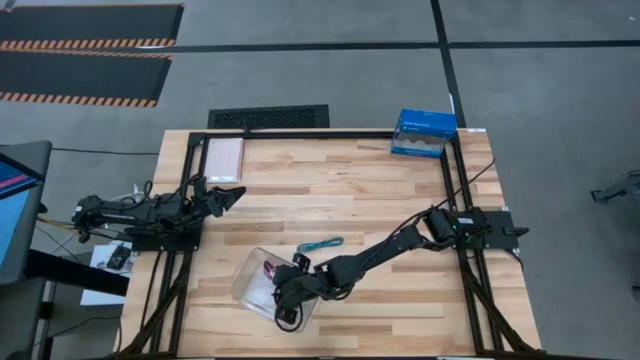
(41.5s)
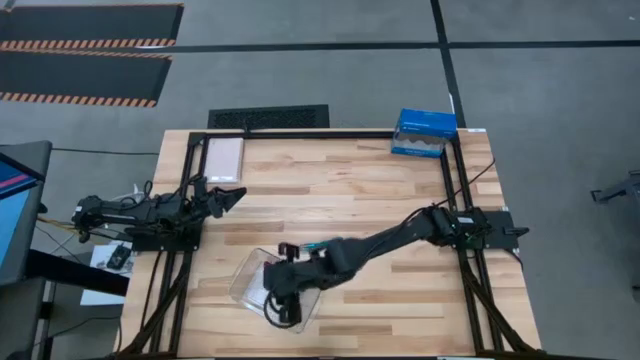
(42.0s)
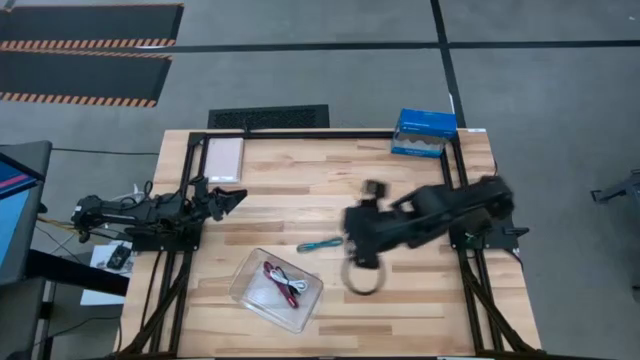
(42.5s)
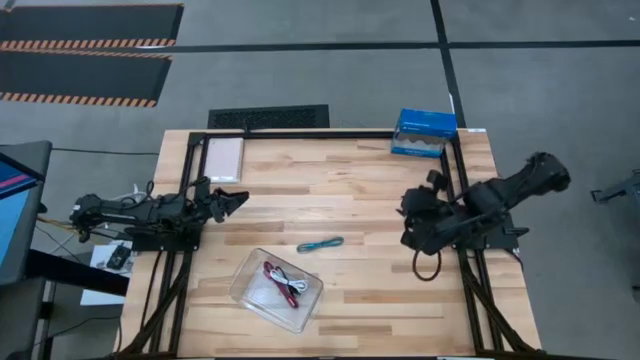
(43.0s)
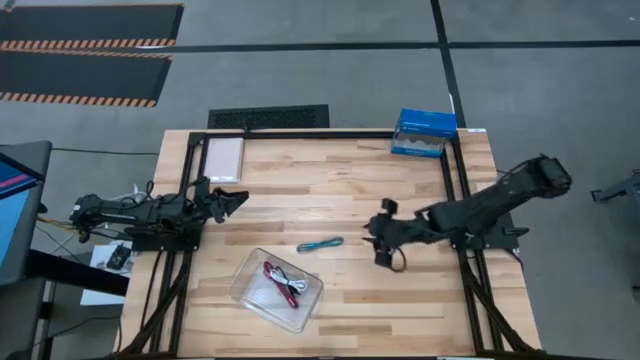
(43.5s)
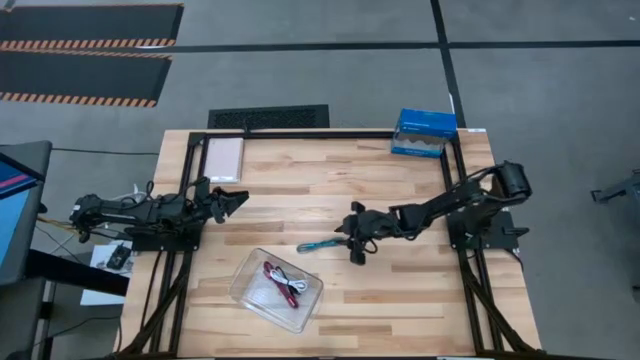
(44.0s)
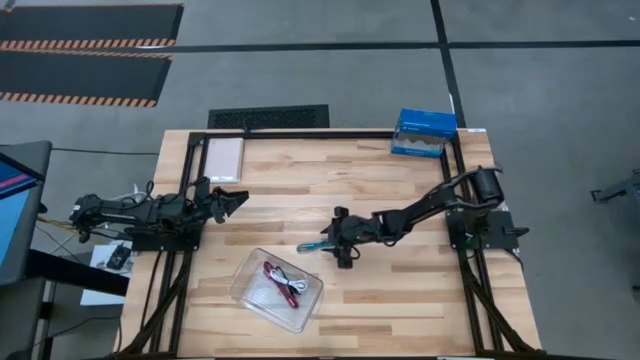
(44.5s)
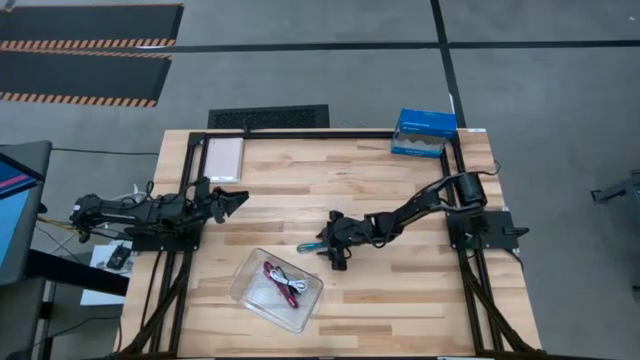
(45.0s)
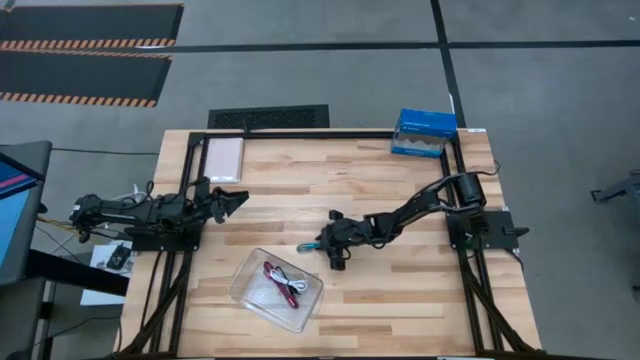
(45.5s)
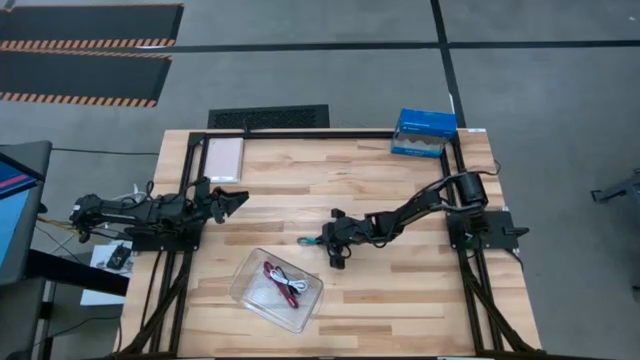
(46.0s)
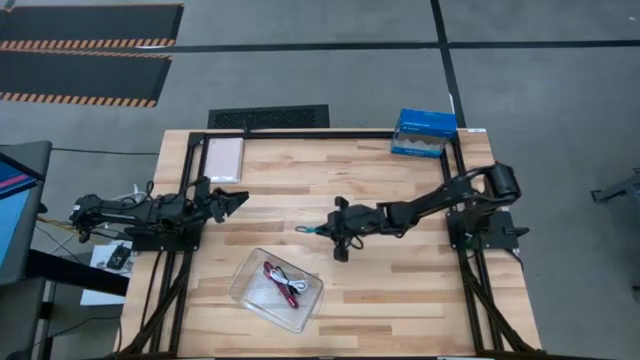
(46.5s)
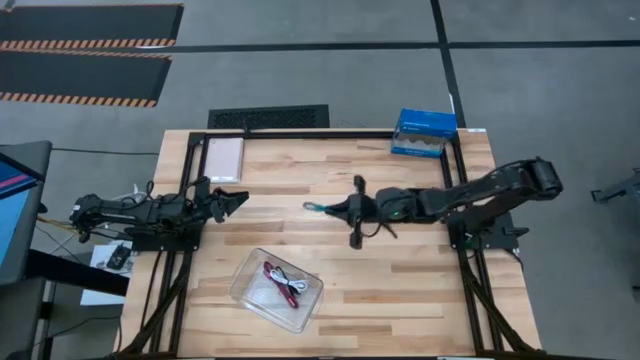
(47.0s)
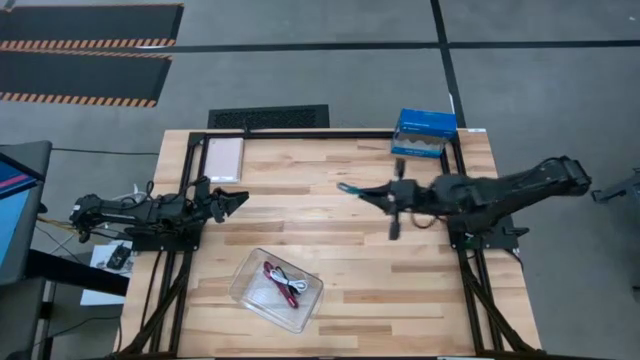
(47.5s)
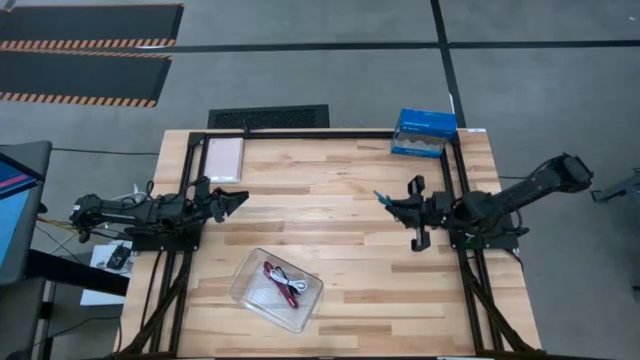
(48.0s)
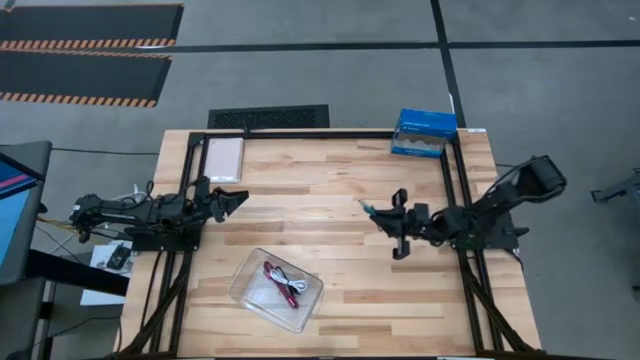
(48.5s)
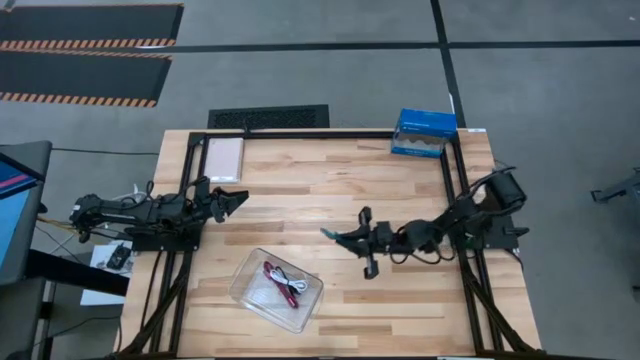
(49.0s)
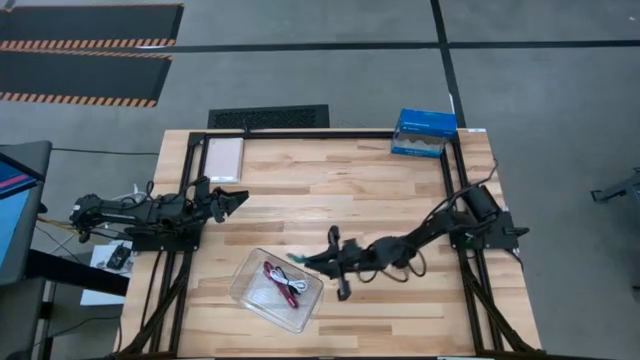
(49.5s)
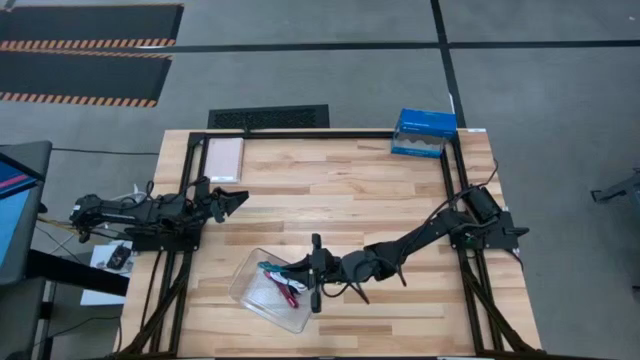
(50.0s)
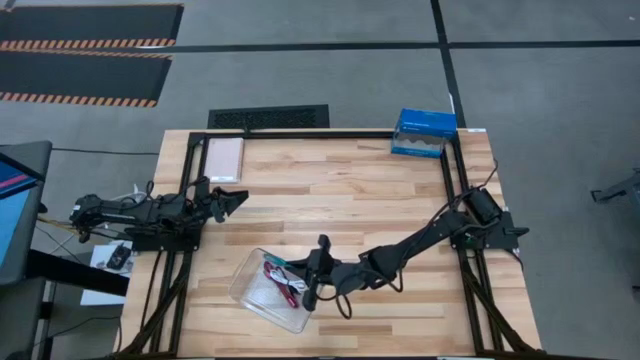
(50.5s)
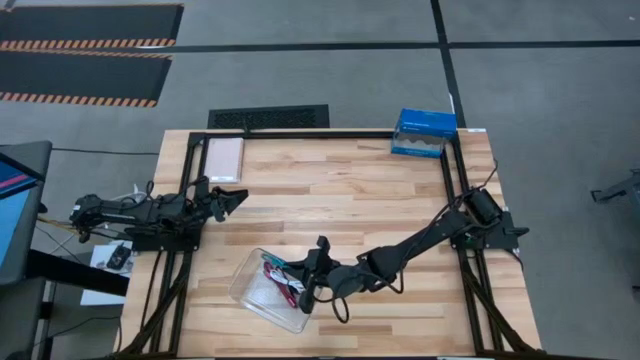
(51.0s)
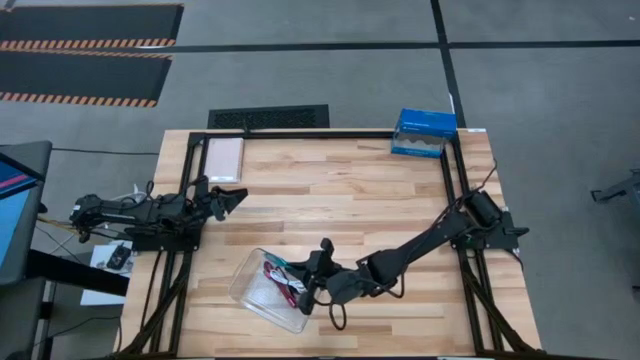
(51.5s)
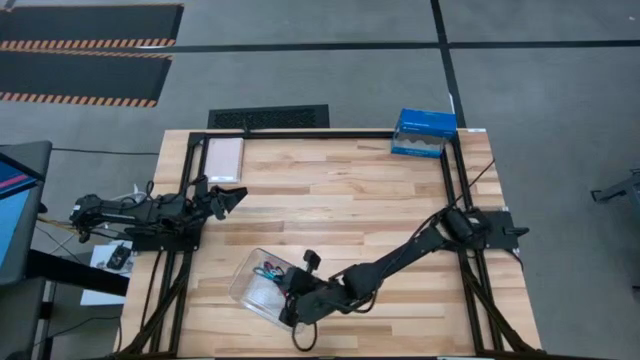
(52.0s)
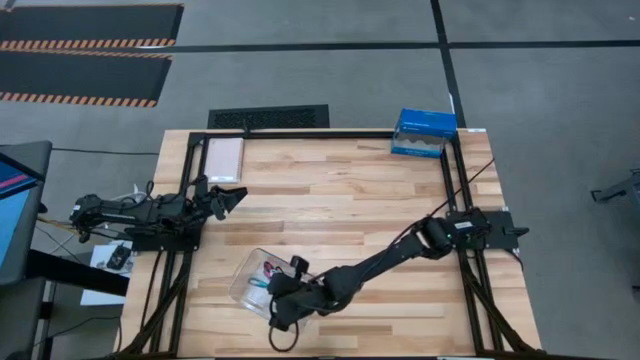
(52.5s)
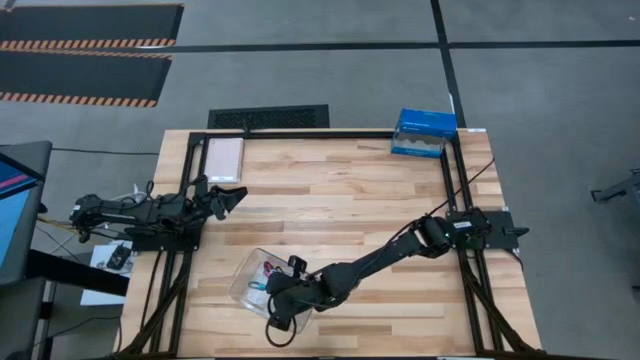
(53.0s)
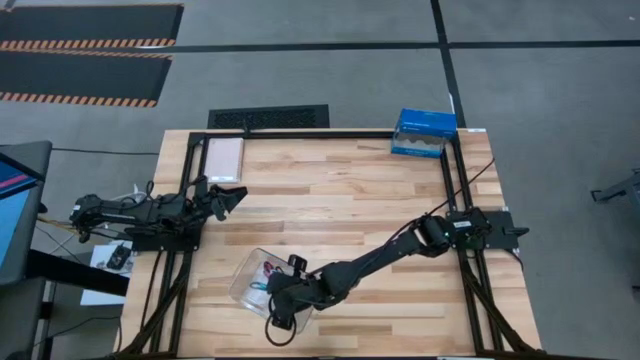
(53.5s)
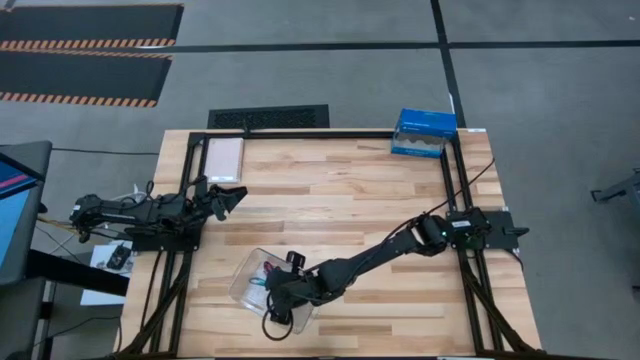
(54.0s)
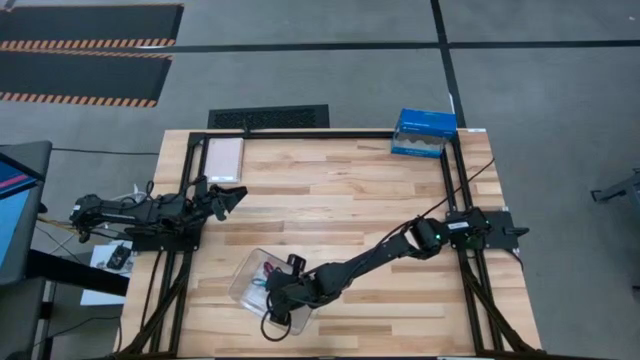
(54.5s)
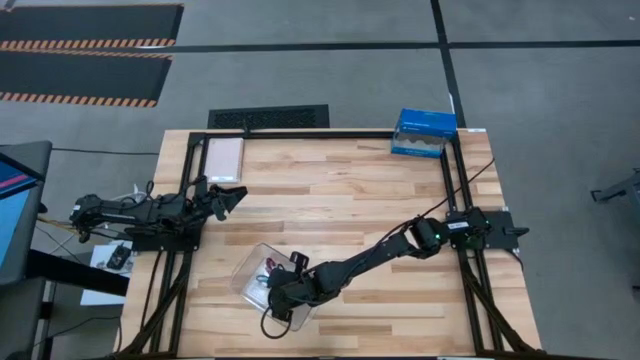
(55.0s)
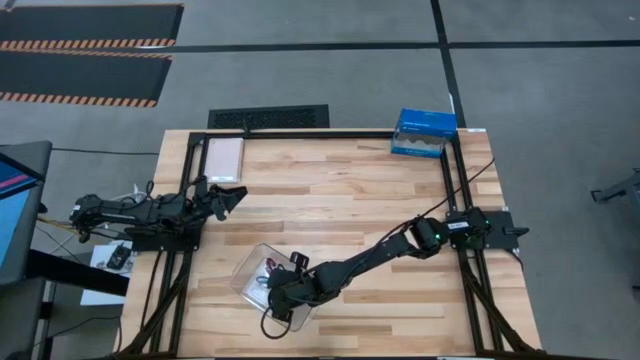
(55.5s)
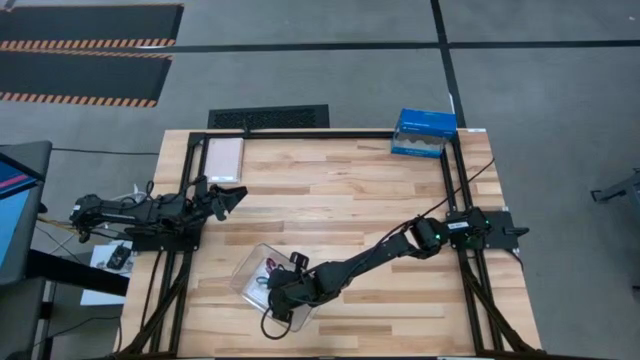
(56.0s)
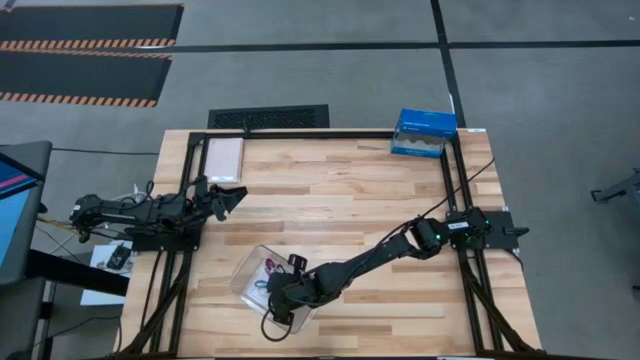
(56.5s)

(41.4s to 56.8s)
Task: Pick and place USB-C Cables
Put the blue charger cable into the transparent bin

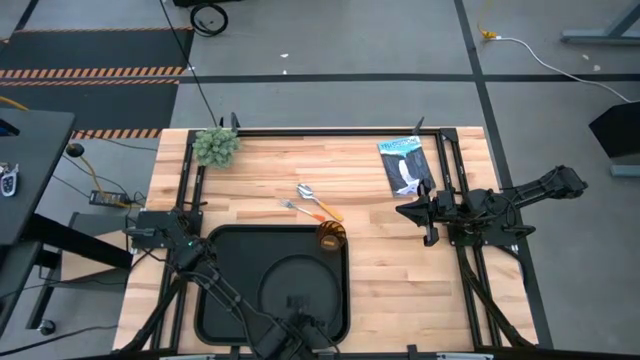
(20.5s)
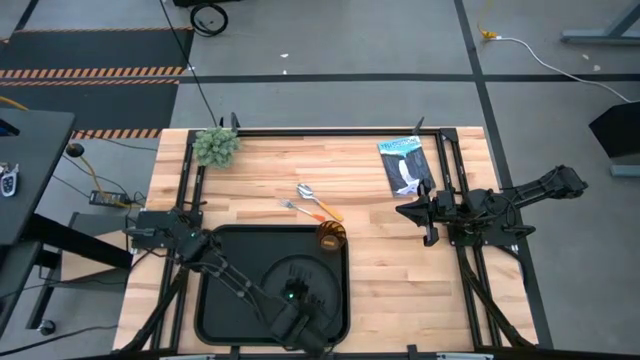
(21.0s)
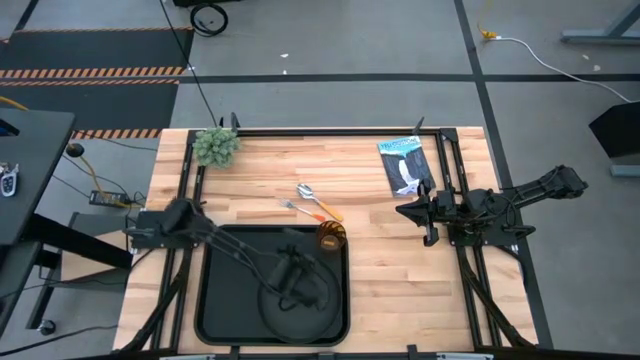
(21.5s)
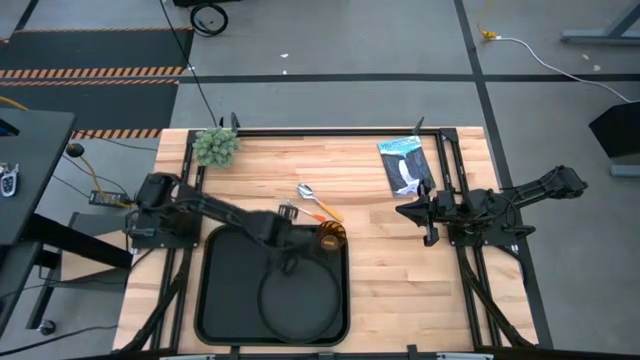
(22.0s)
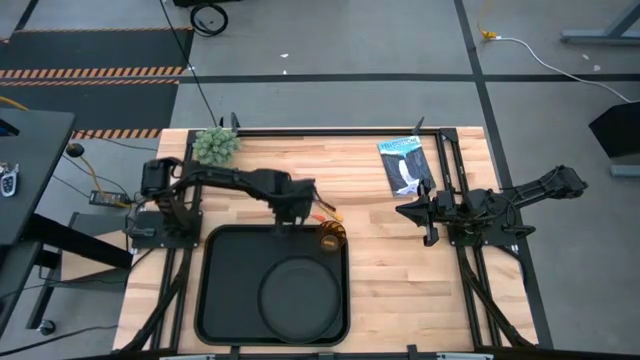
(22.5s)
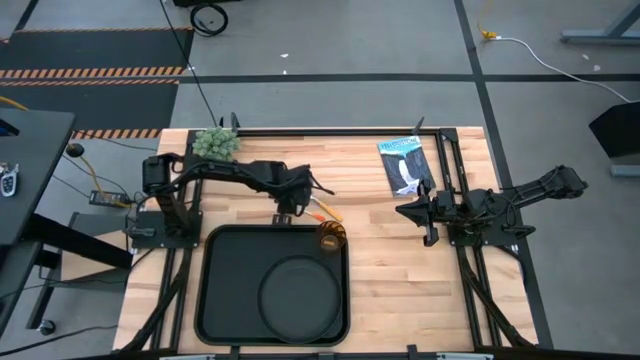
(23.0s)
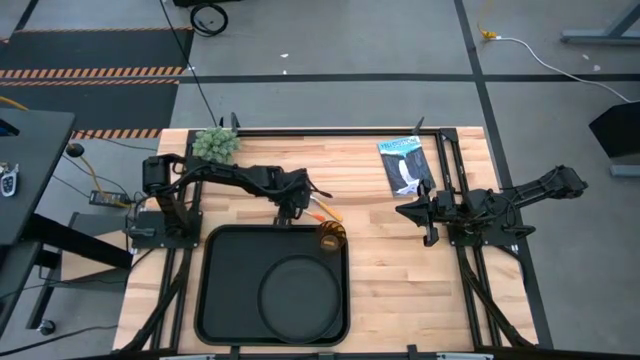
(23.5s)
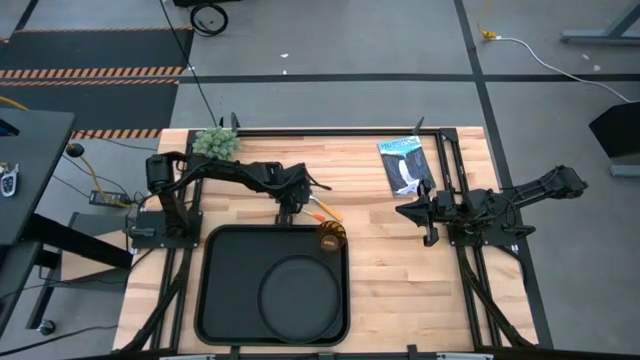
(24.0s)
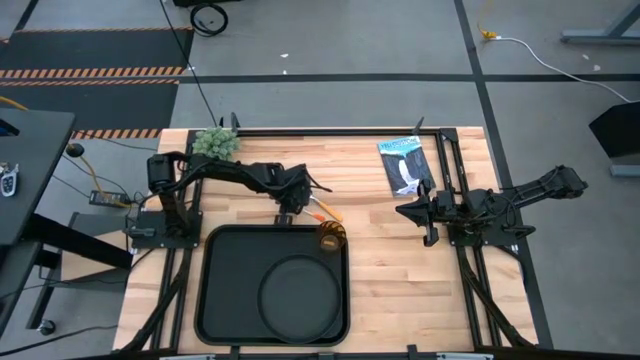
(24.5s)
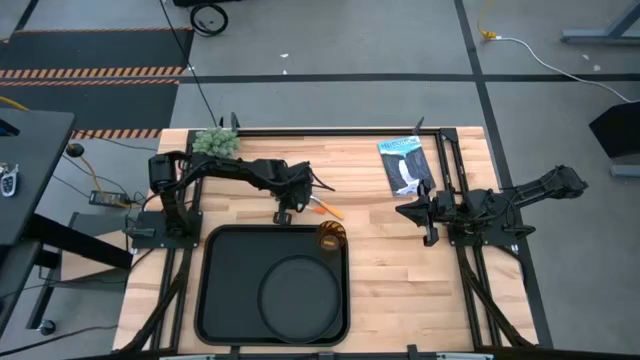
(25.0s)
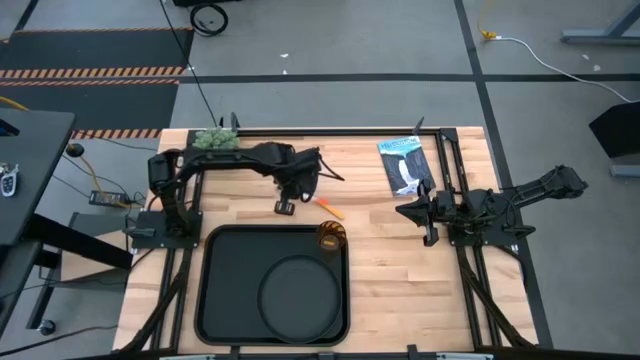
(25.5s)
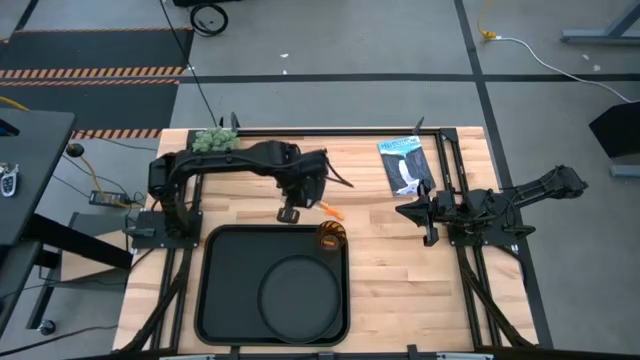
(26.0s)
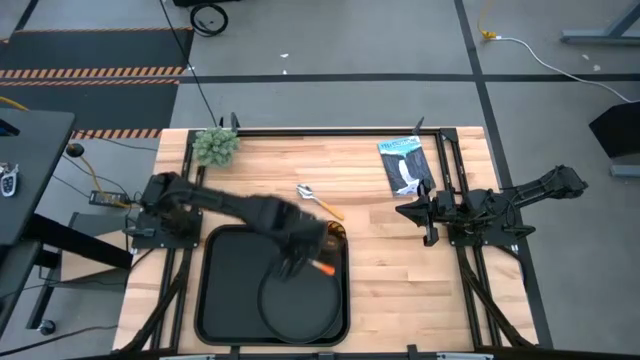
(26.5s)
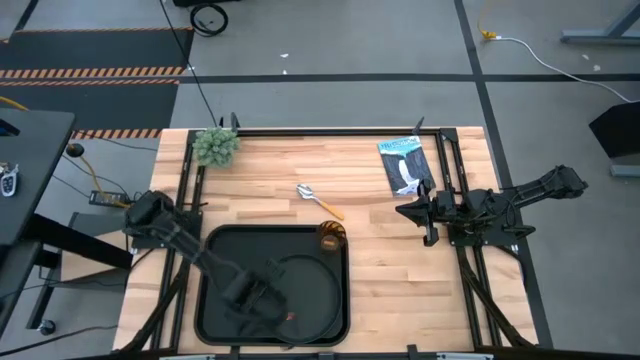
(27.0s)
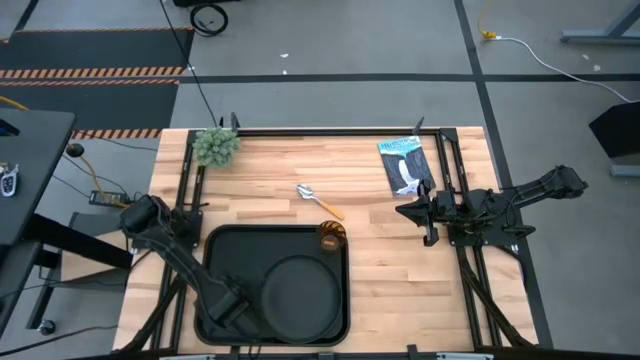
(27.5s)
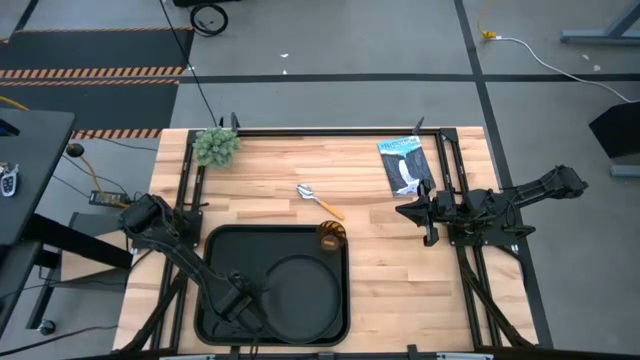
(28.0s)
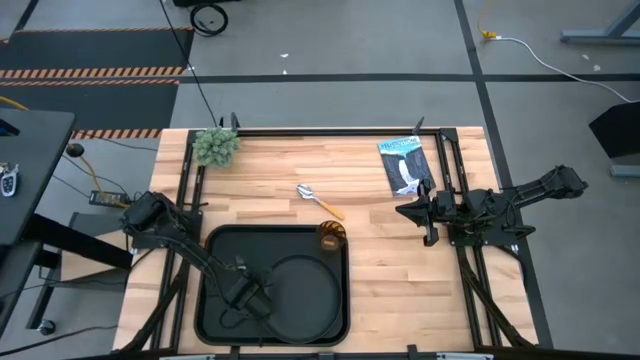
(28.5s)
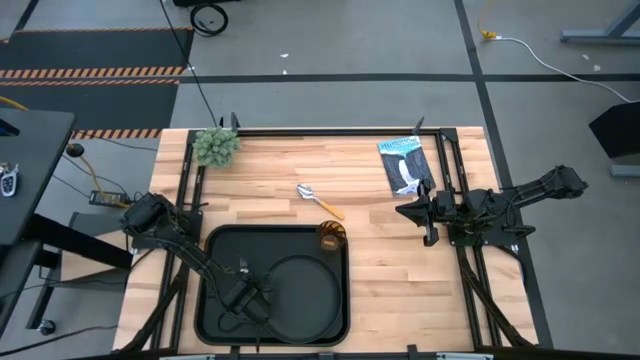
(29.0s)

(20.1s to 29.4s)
Task: Pick and place plate/cup/fork/spoon on tray
Put the orange fork on the black tray on the left of the black plate
